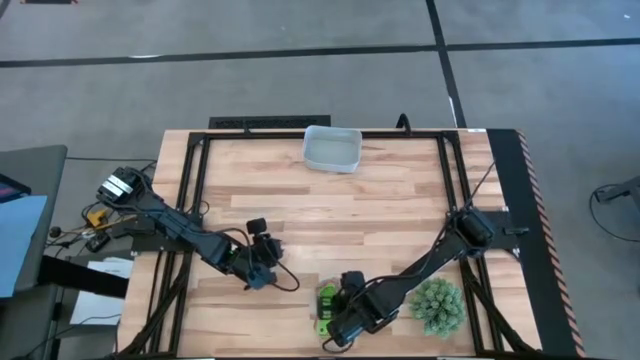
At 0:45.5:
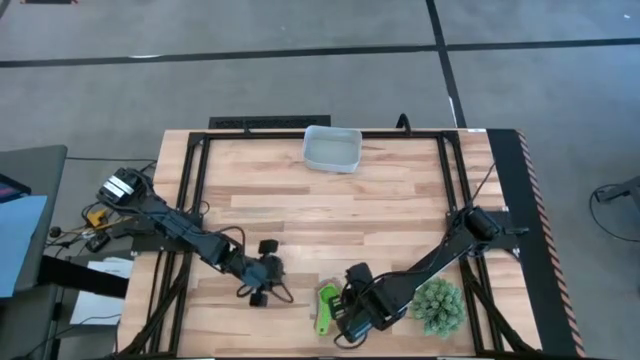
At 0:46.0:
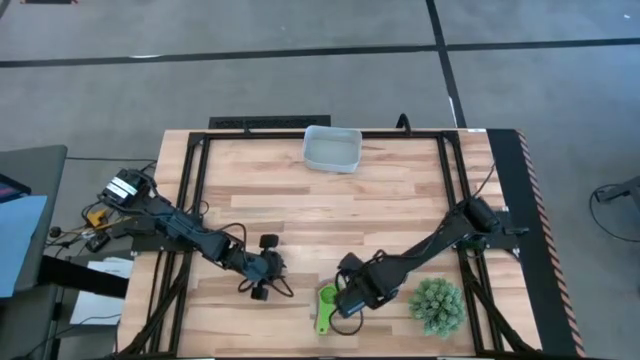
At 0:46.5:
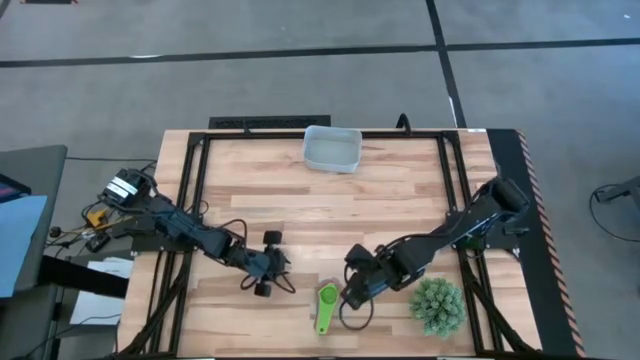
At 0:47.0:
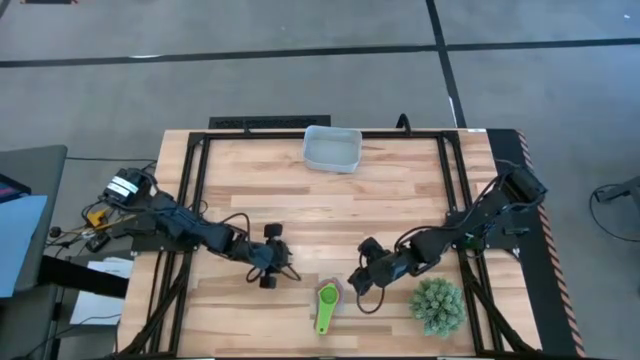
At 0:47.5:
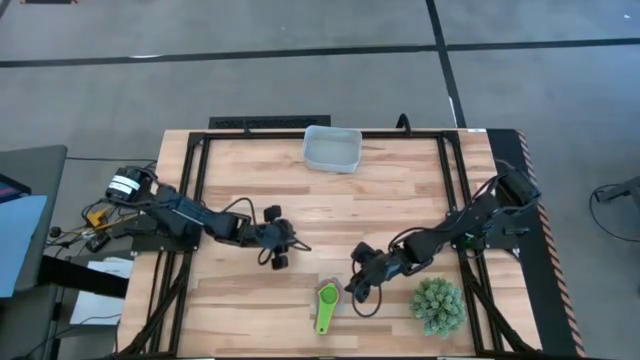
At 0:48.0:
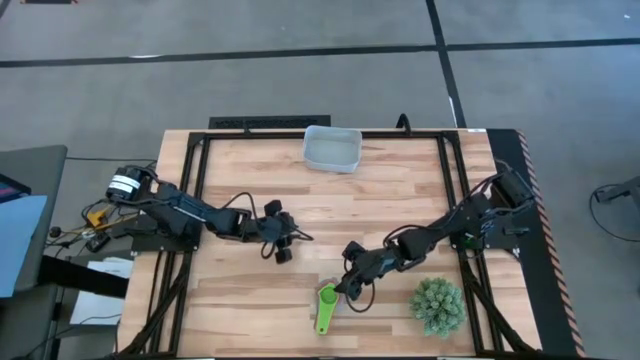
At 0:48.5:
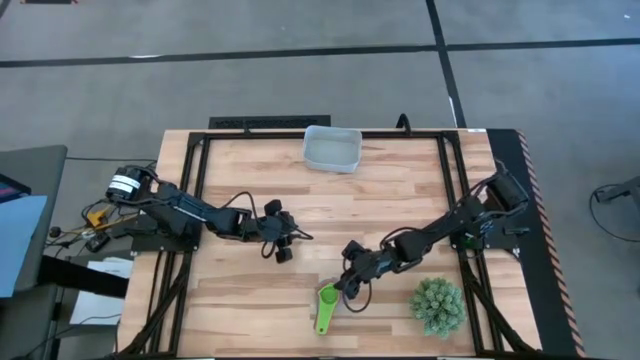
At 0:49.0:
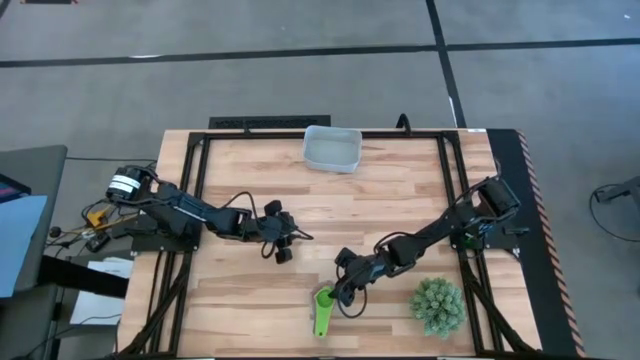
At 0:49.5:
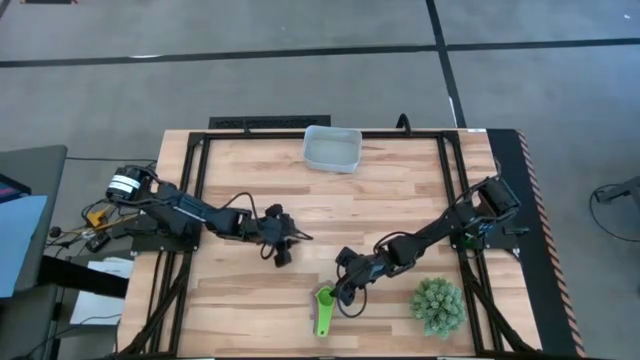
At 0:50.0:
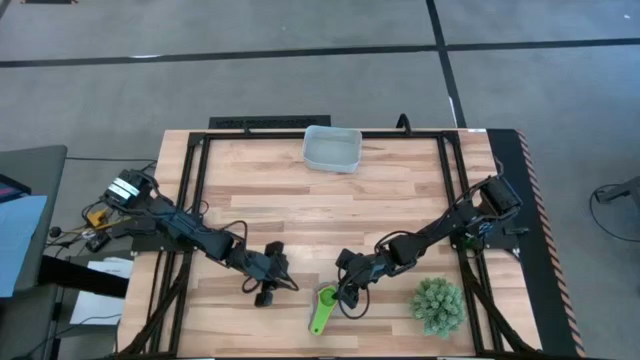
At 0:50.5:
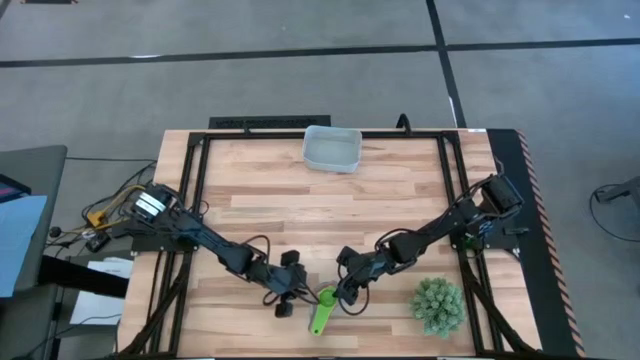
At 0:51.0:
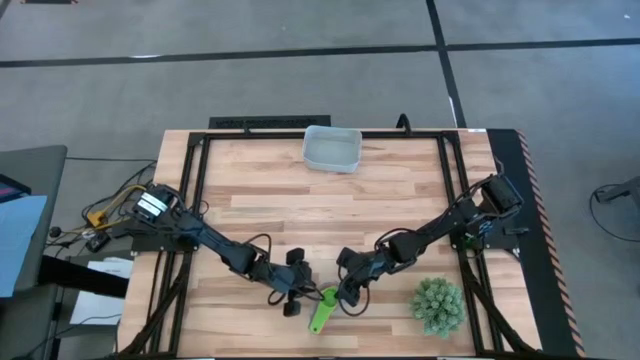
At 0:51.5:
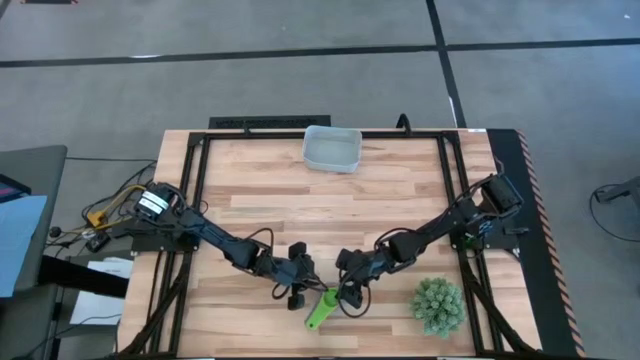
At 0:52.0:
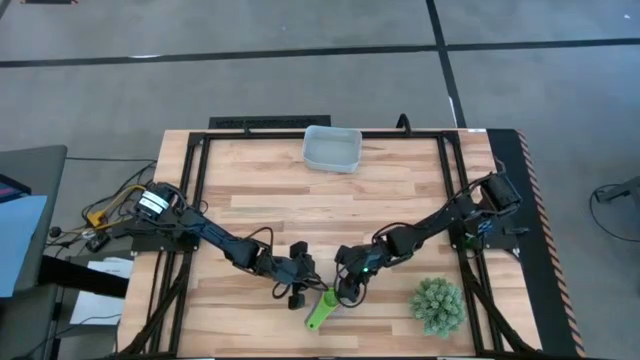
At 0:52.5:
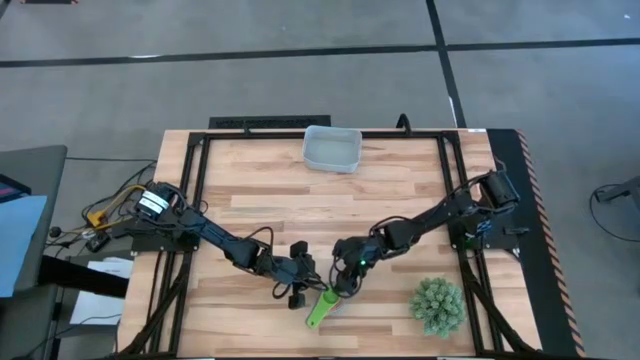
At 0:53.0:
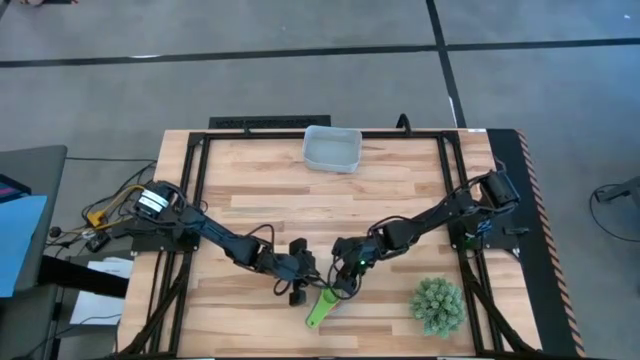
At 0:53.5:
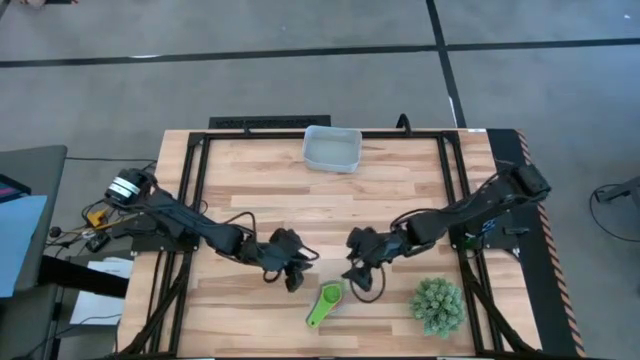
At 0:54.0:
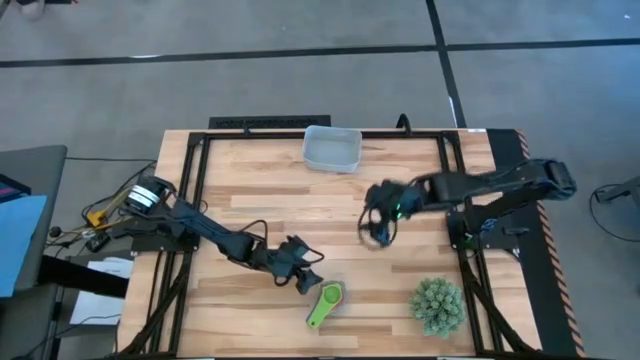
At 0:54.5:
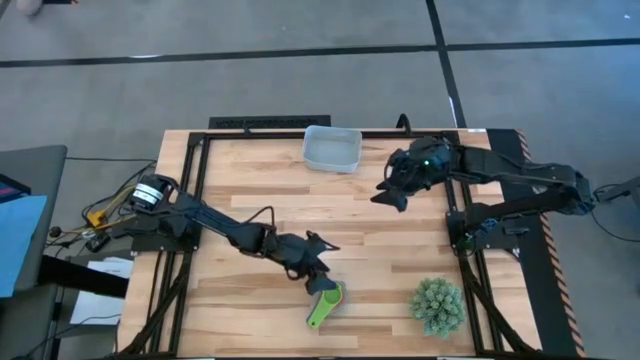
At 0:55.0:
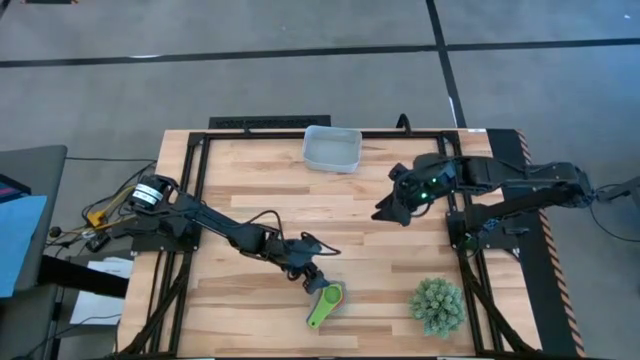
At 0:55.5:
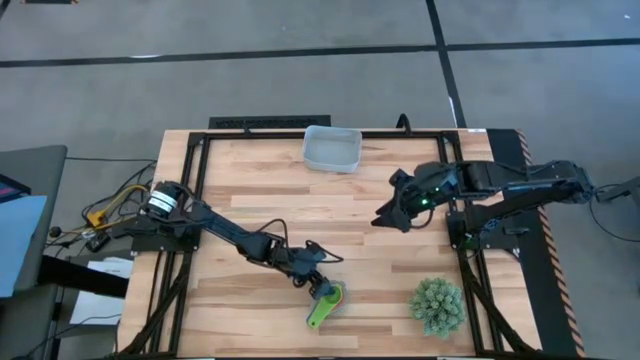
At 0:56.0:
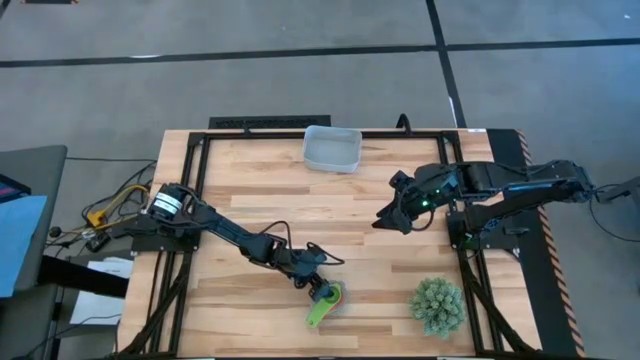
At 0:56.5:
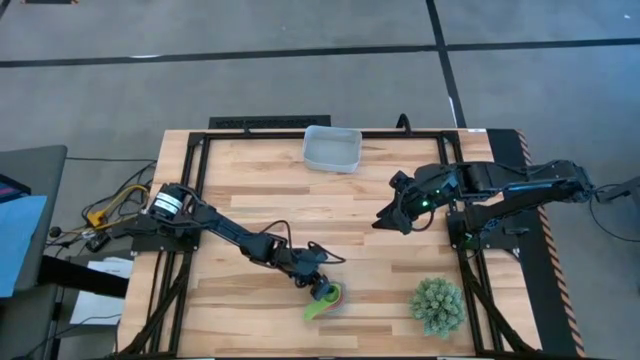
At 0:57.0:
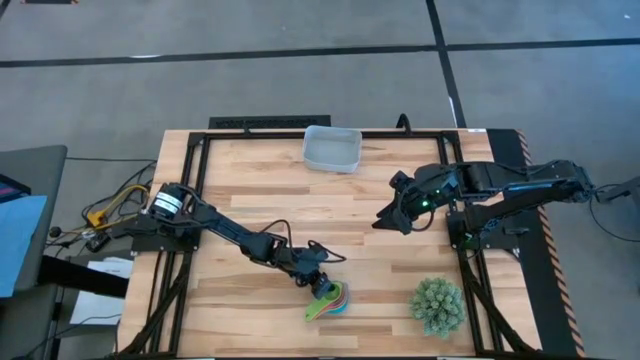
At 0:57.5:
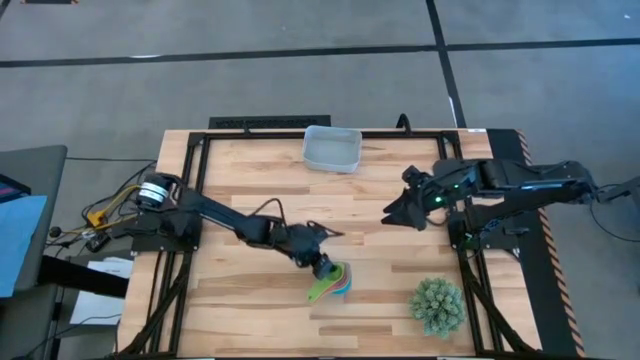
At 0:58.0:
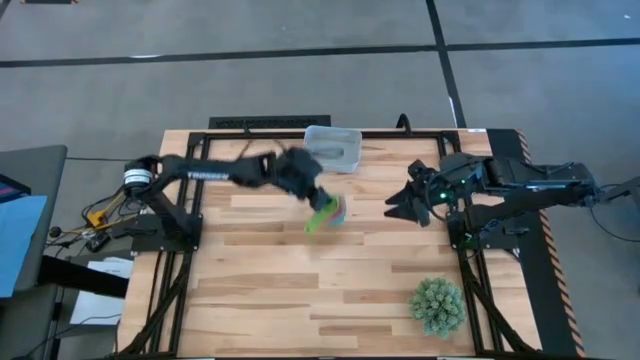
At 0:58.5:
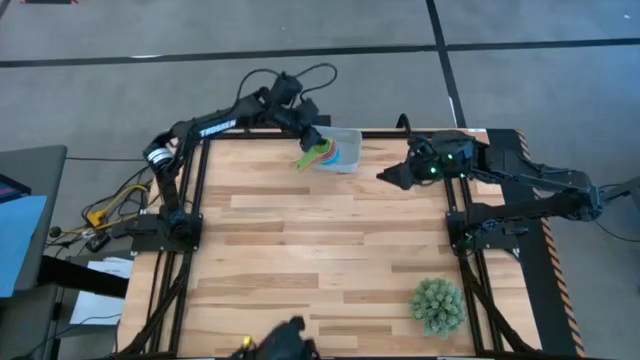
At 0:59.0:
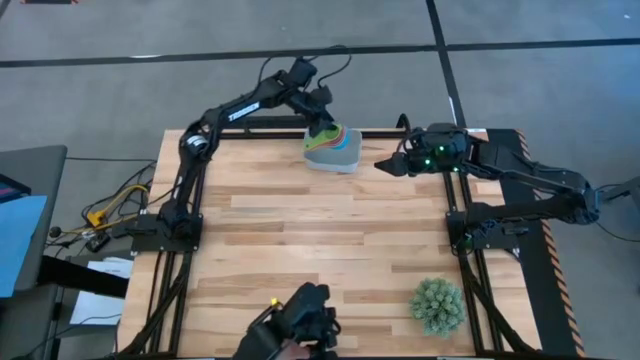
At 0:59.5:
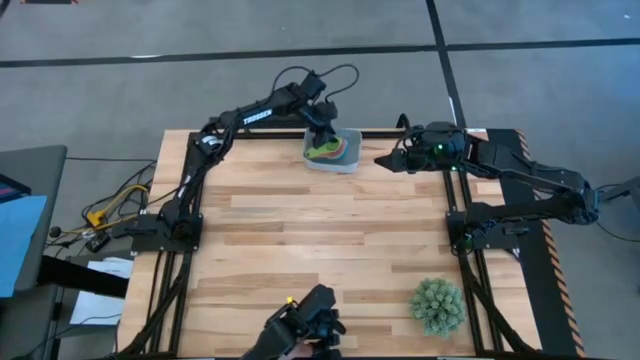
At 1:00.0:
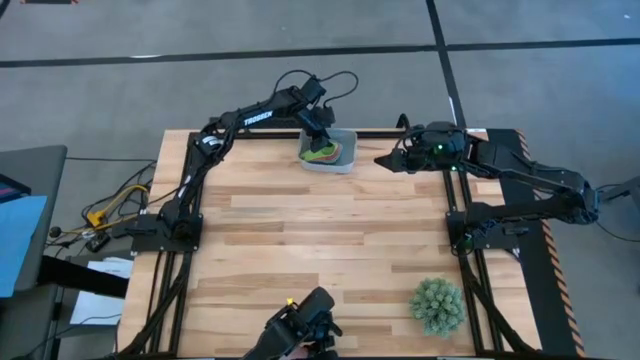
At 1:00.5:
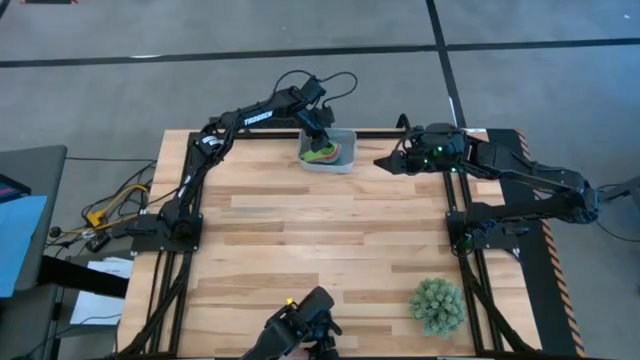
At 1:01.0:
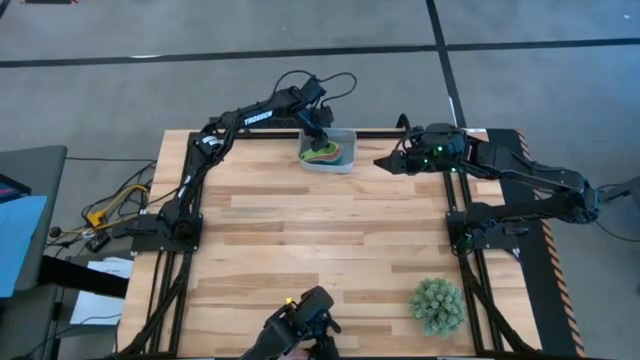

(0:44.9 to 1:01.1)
Task: Nest measuring cups in basket
Put the nested measuring cups into the bin

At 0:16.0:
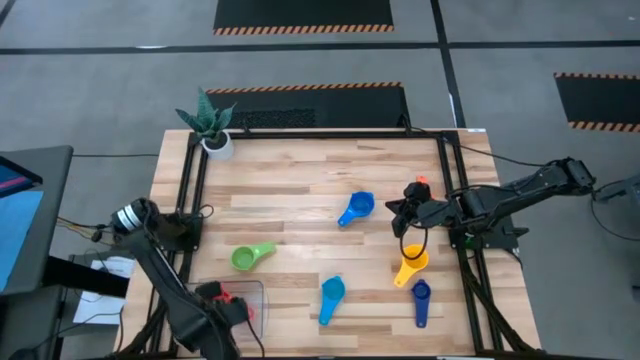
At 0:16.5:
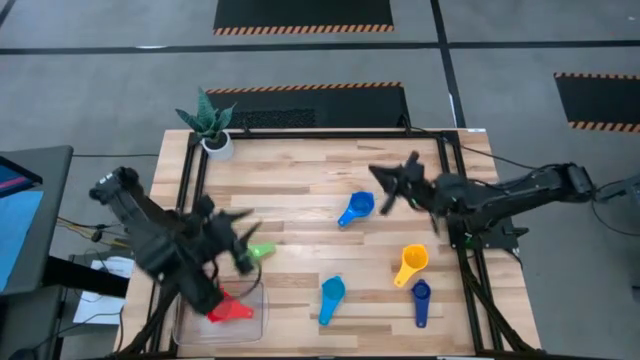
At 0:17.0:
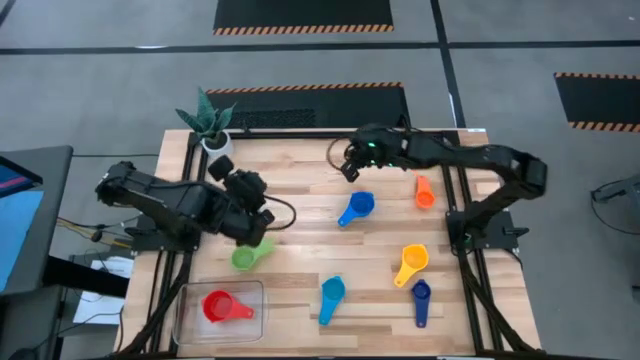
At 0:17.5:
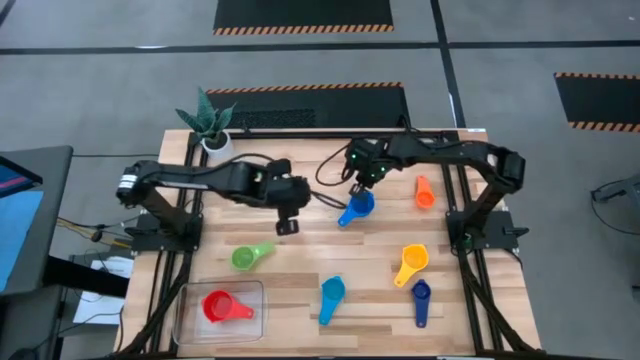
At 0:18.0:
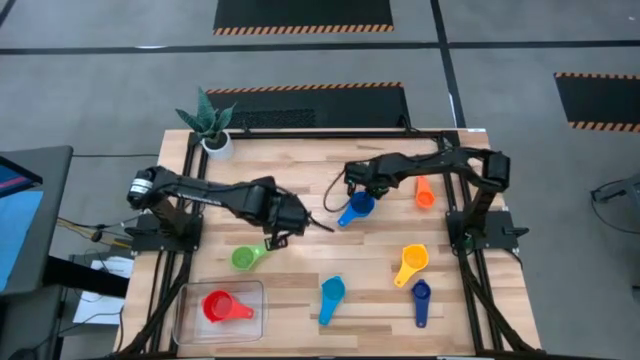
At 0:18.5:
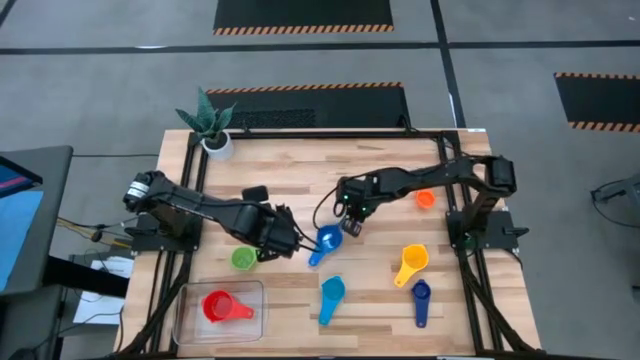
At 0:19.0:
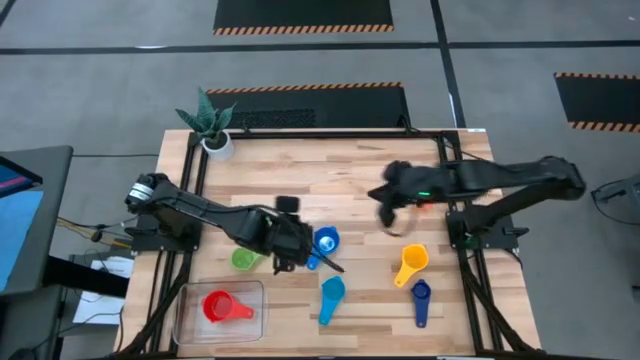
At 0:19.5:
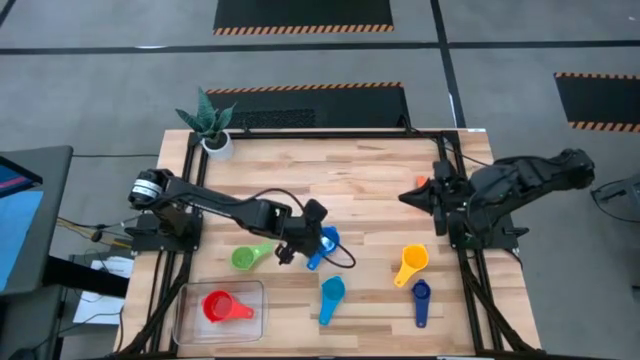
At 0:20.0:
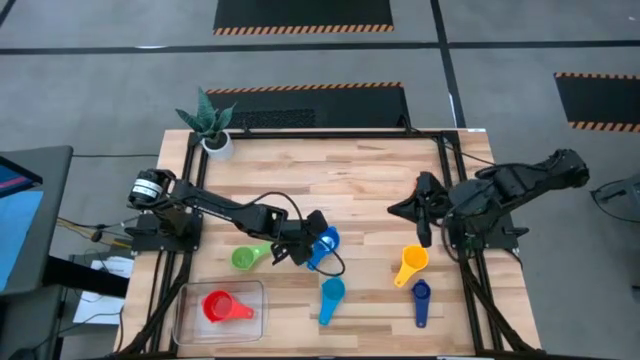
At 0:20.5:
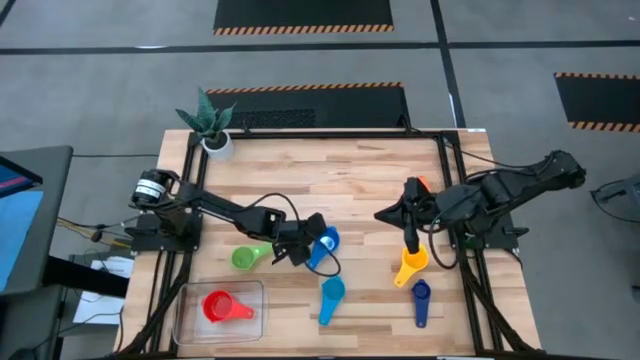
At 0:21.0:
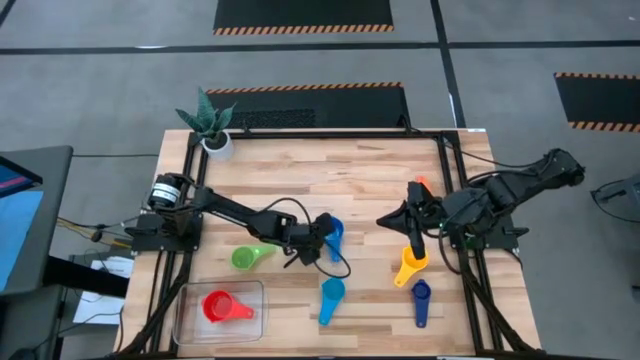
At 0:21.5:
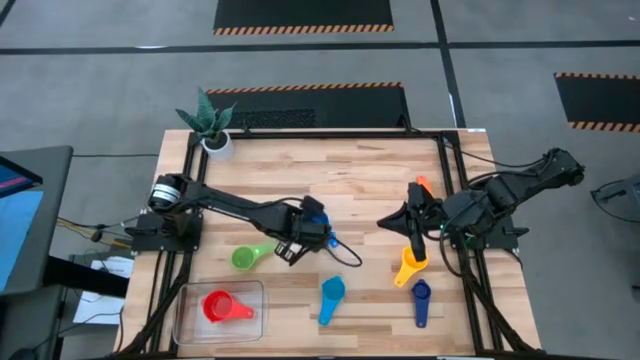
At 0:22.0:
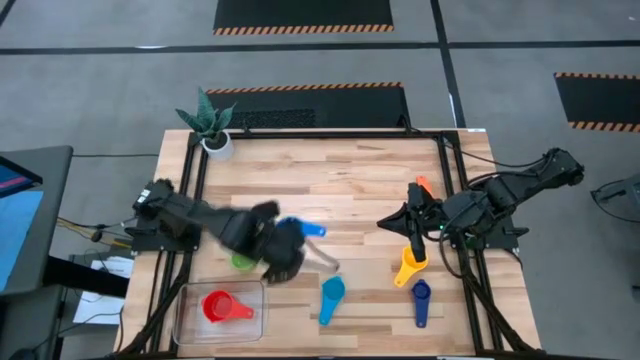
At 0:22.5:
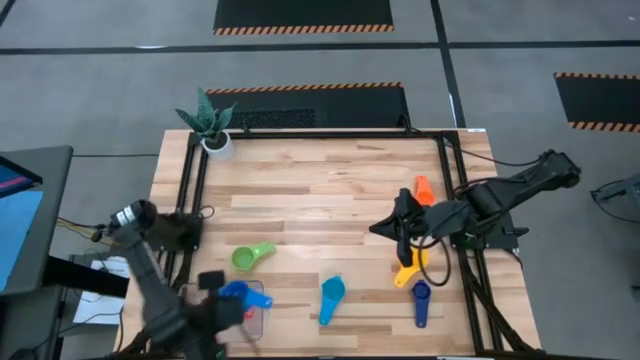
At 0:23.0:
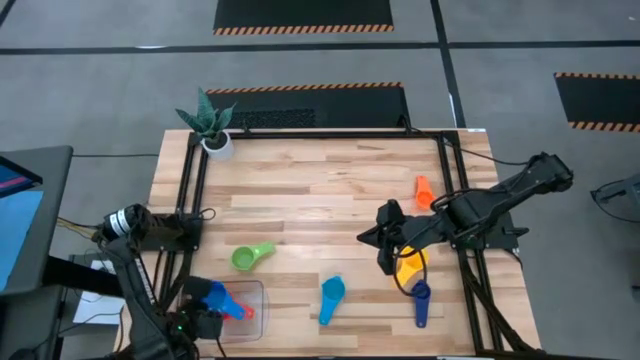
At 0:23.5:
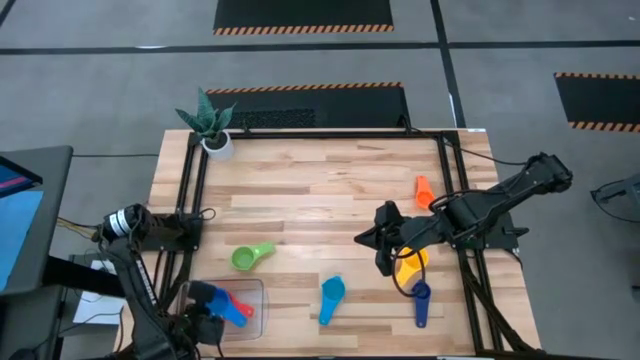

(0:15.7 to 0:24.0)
Task: Nest measuring cups in basket
Stack the blue measuring cup on top of the red measuring cup in the transparent bin
